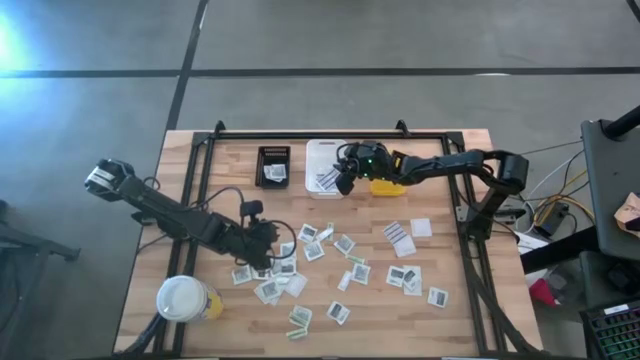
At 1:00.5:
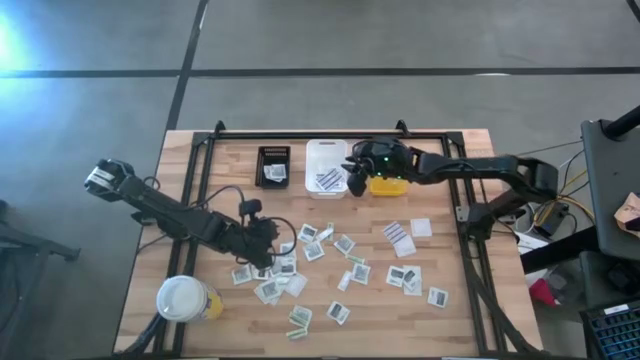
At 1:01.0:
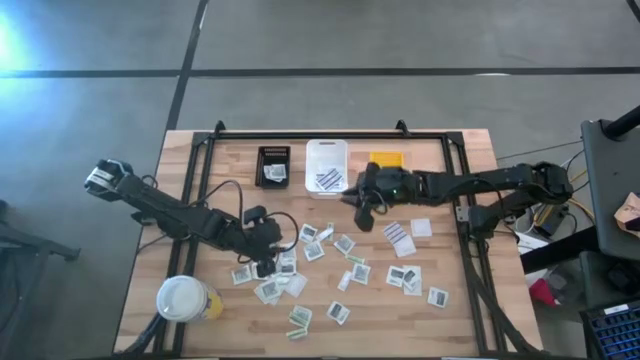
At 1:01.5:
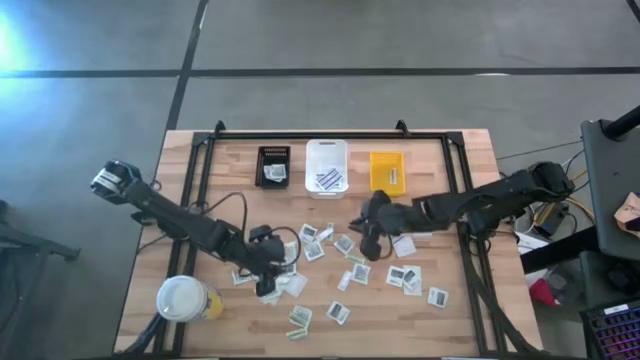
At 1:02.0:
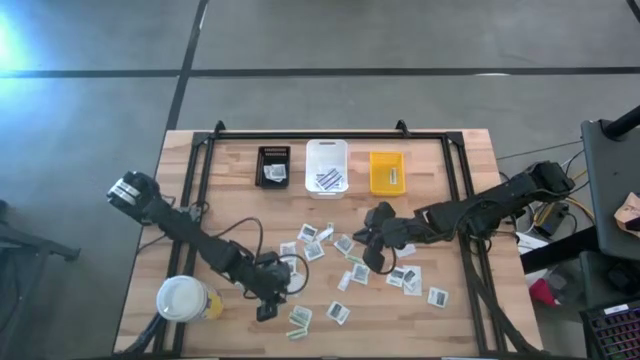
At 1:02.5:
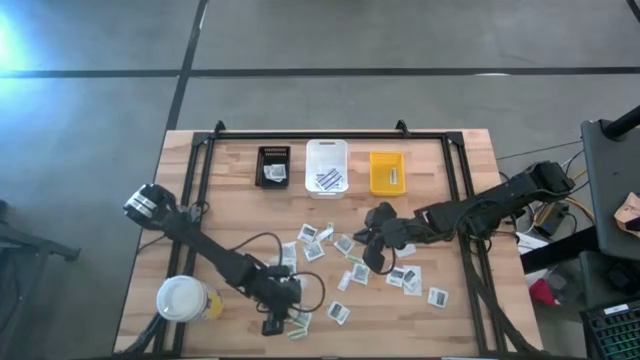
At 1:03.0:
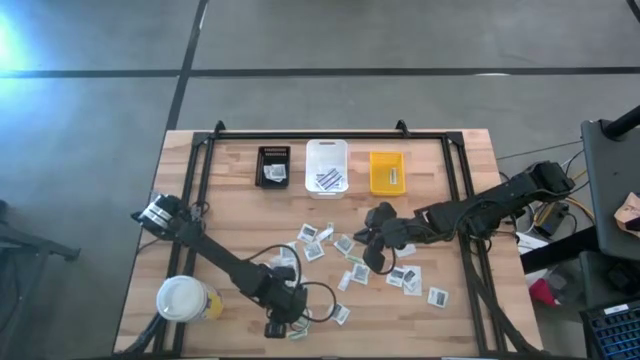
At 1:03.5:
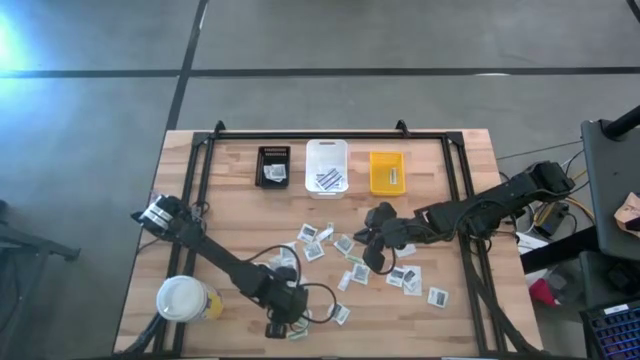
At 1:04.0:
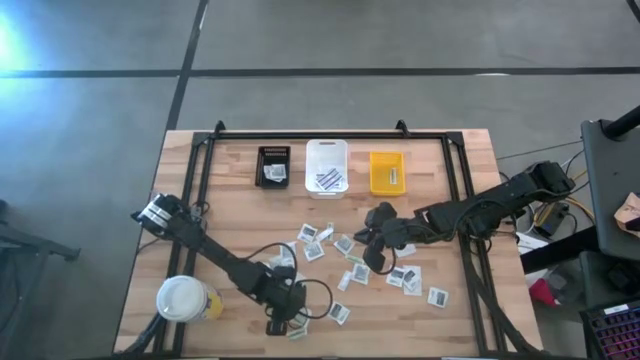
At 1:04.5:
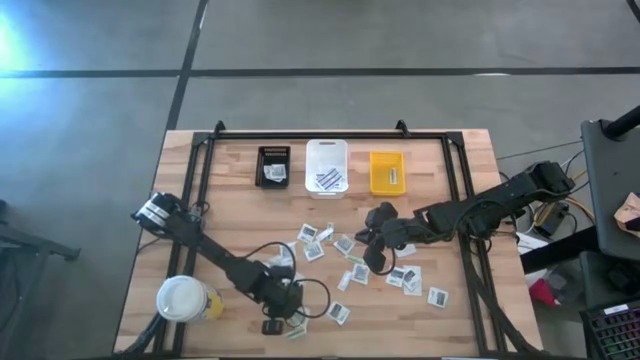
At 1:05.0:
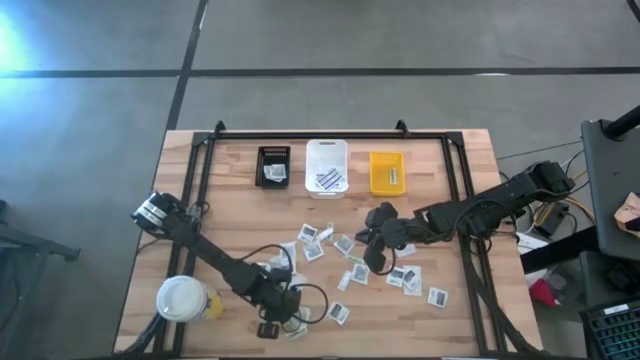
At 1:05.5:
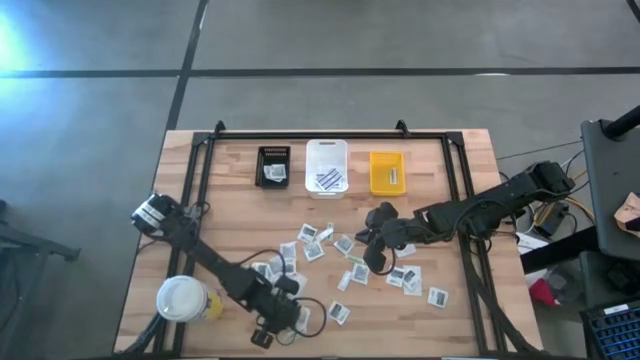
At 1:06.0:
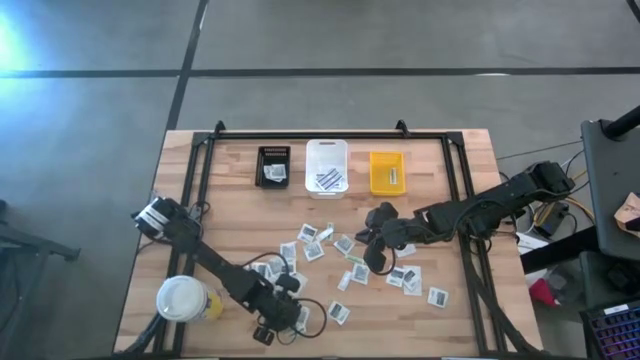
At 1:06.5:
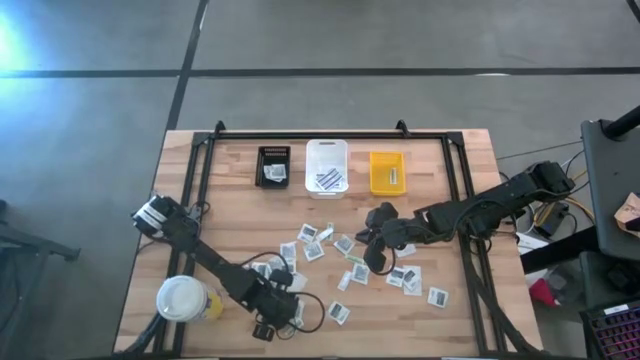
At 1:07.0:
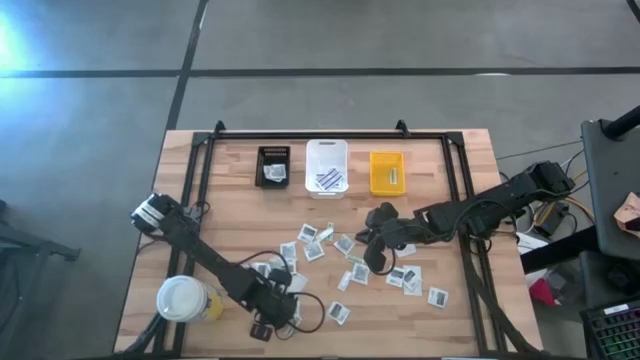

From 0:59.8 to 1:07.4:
Task: Pick & Place First Aid Supplies
Put the green bandage into the yellow basket

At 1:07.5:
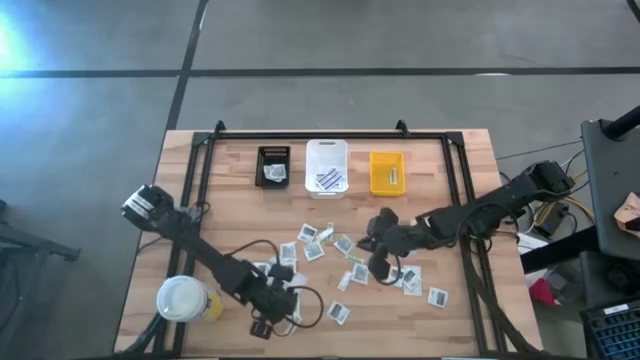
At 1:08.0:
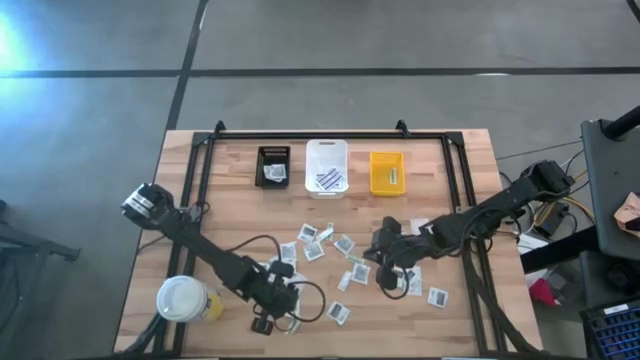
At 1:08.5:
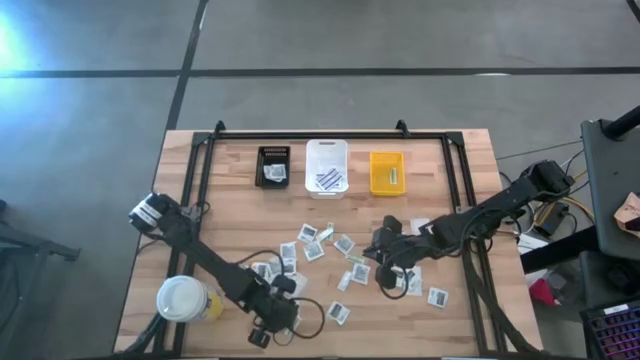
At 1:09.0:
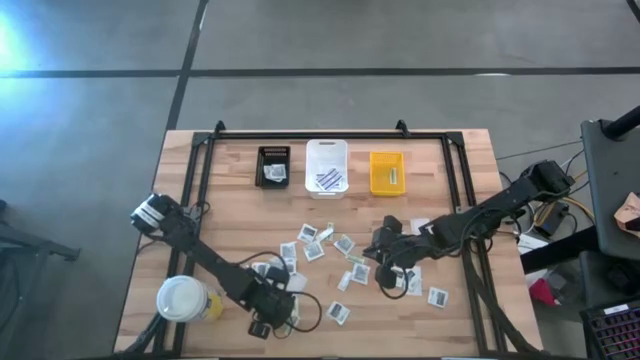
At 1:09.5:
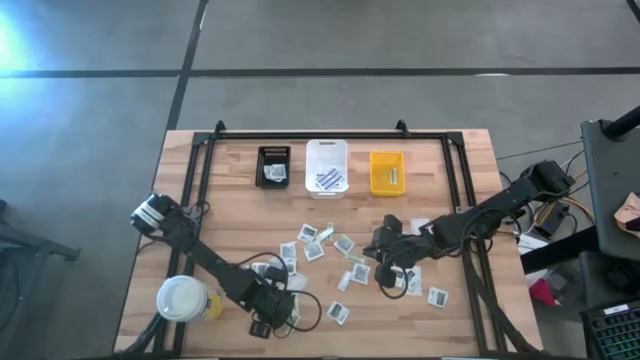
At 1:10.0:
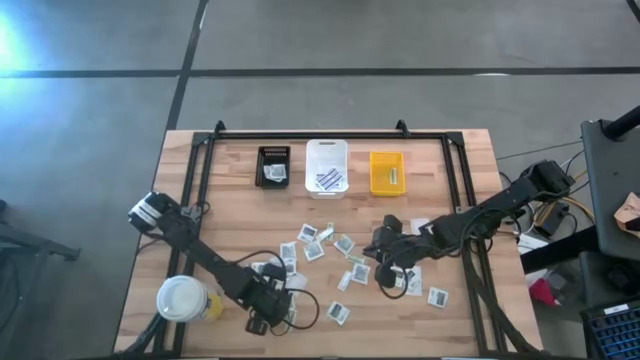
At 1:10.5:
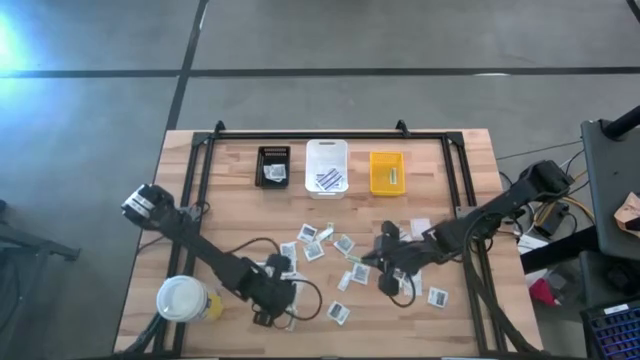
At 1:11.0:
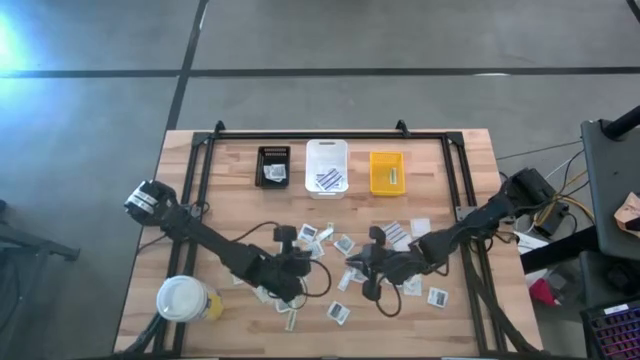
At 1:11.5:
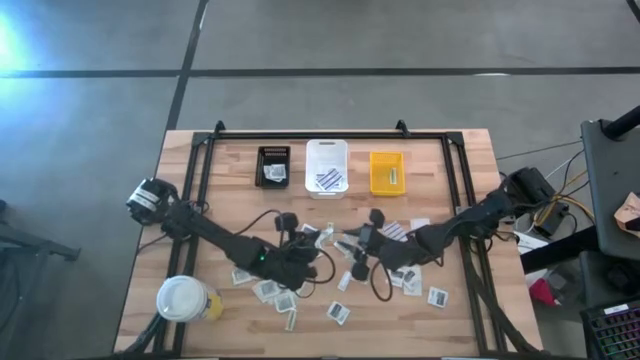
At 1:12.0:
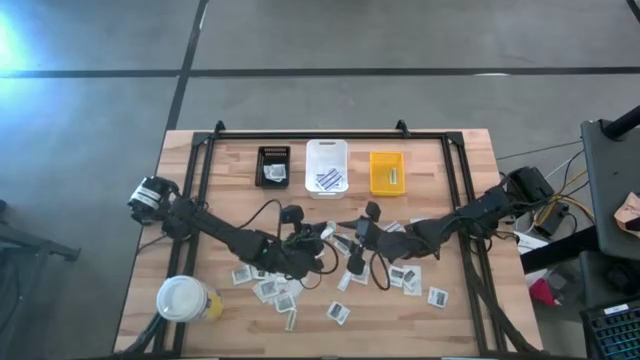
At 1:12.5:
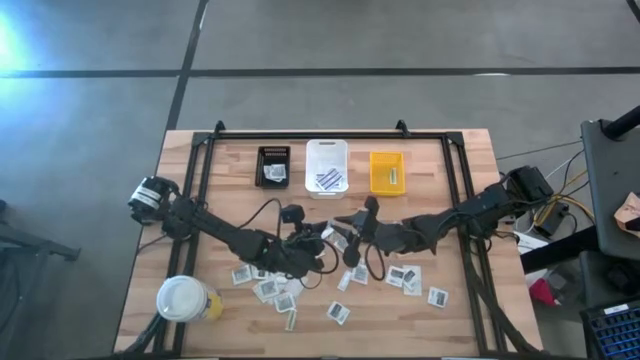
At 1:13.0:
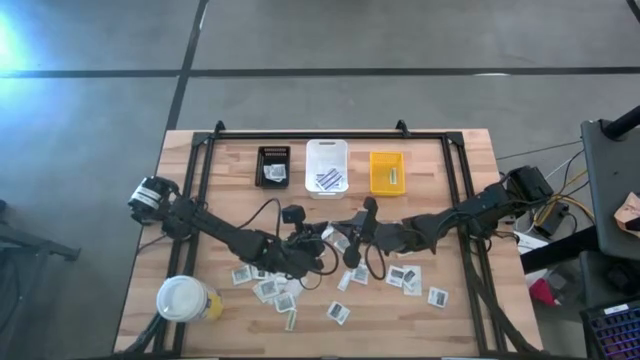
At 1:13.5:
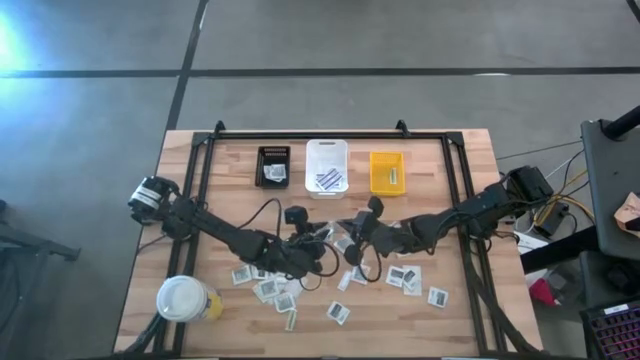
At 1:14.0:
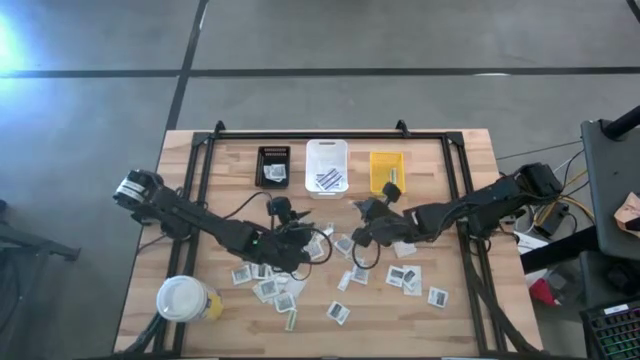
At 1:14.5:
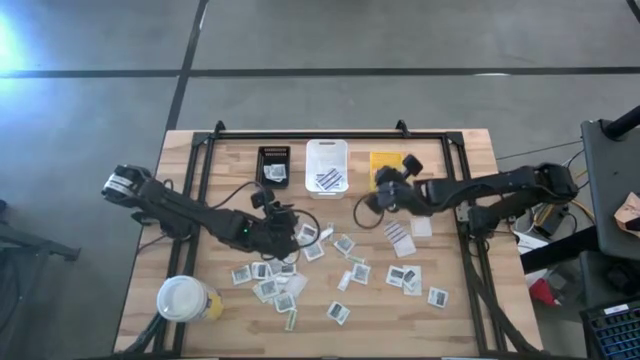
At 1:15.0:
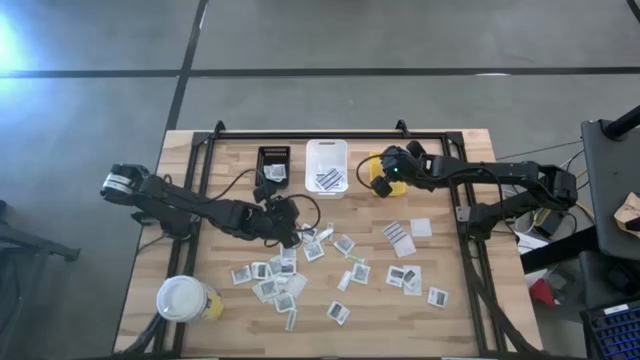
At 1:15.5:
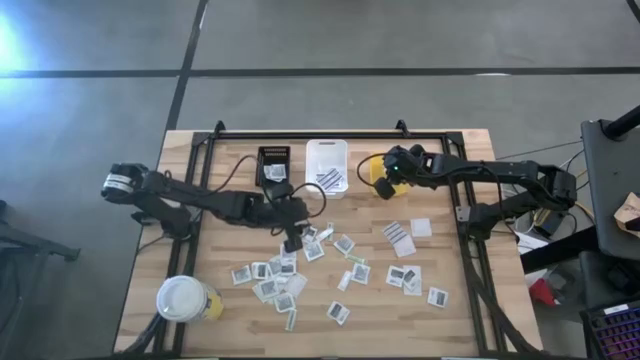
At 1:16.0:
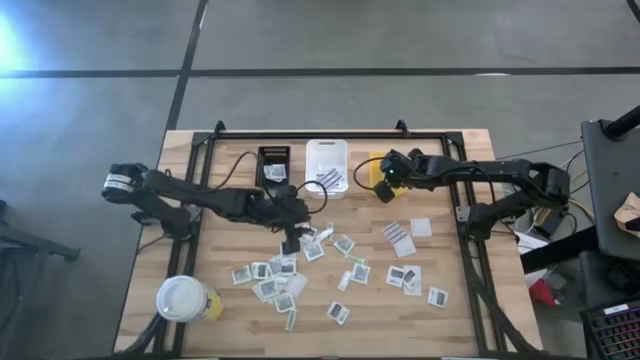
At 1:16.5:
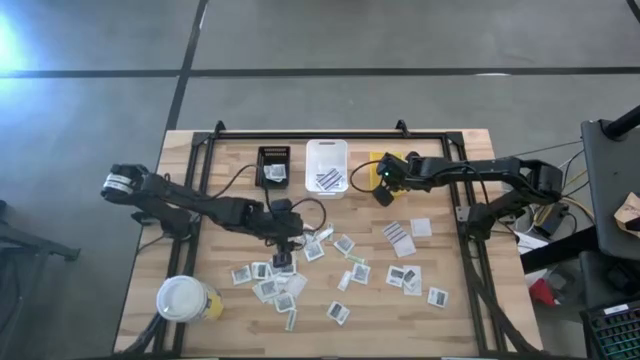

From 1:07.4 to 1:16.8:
Put the green bandage into the yellow basket

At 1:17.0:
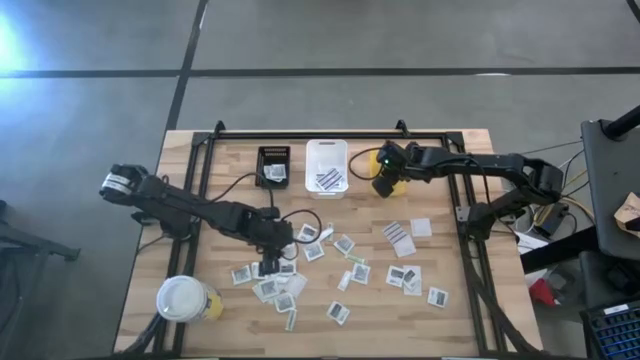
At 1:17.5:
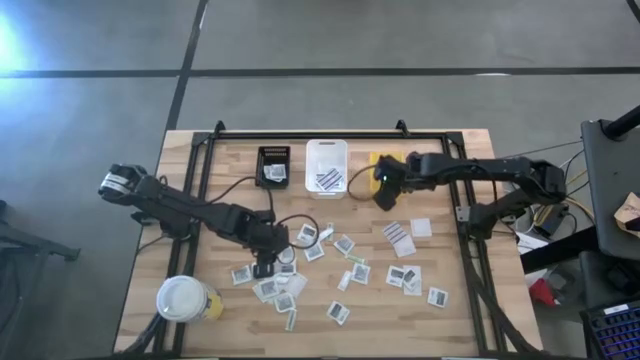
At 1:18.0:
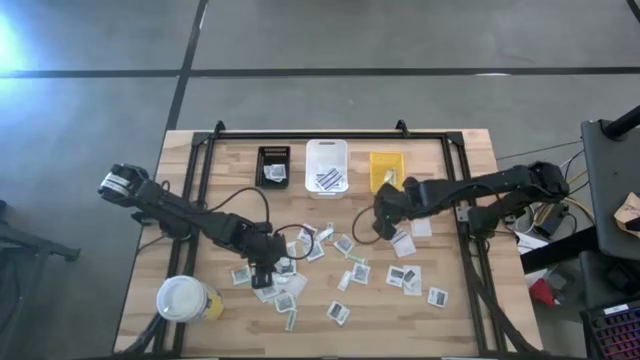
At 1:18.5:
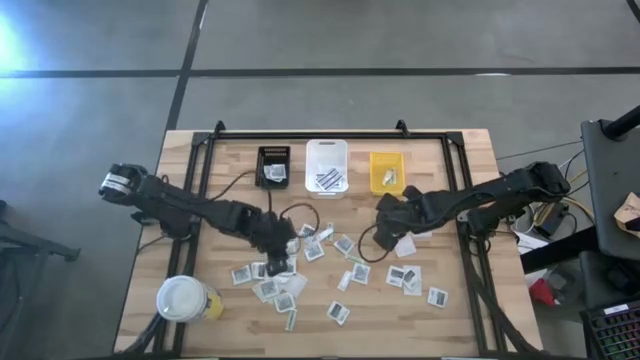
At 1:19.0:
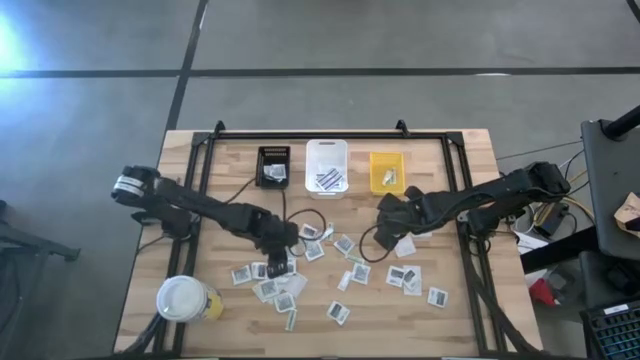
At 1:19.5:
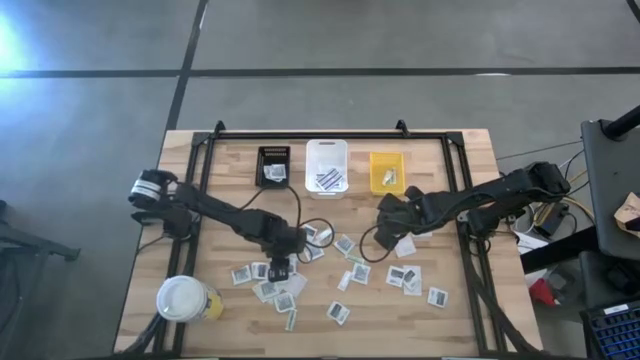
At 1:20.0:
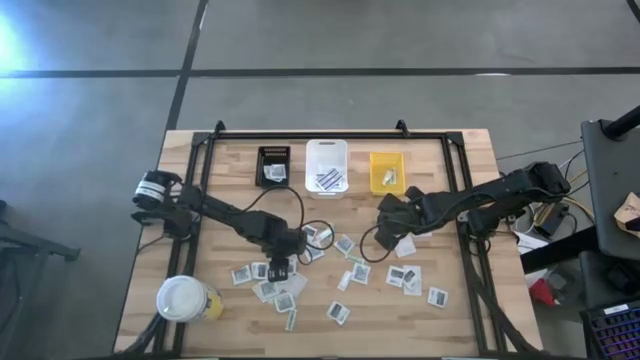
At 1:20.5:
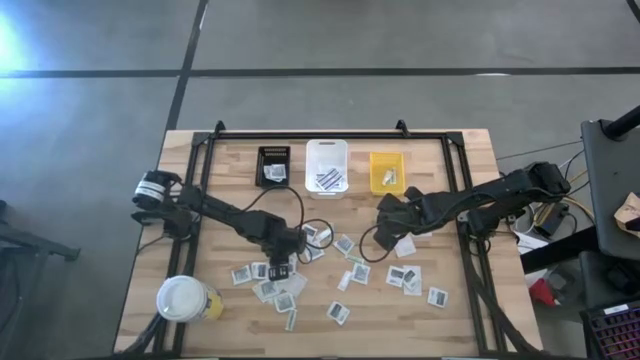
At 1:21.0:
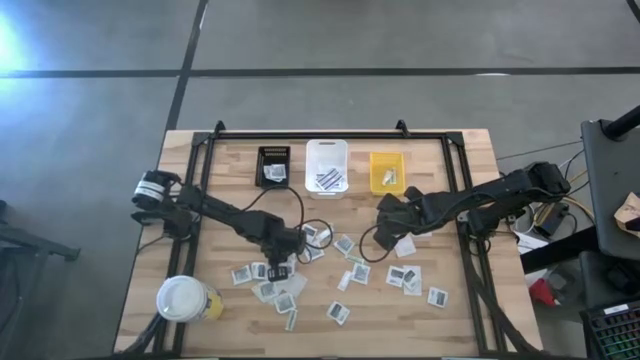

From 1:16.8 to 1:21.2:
Put the towelette pack into the black basket
